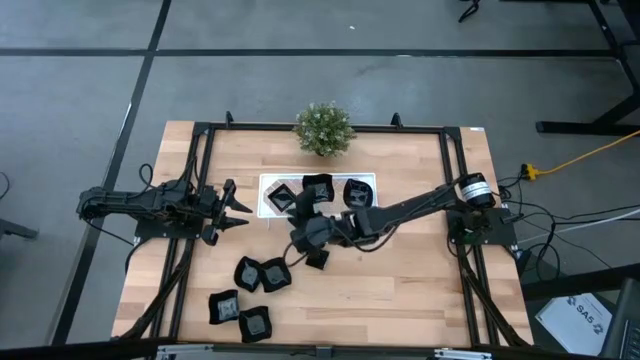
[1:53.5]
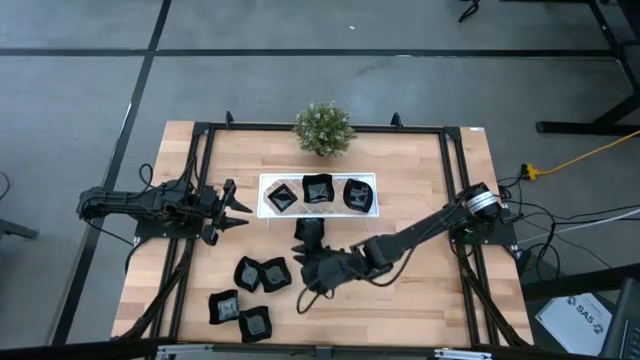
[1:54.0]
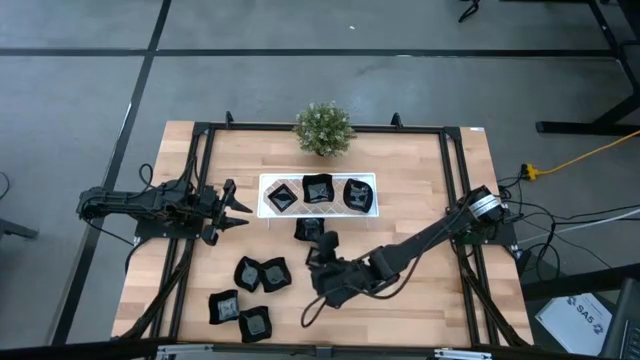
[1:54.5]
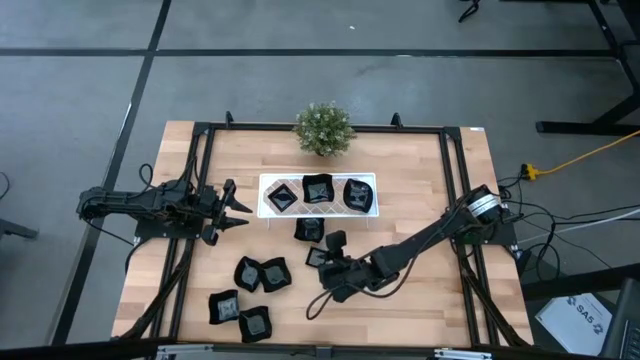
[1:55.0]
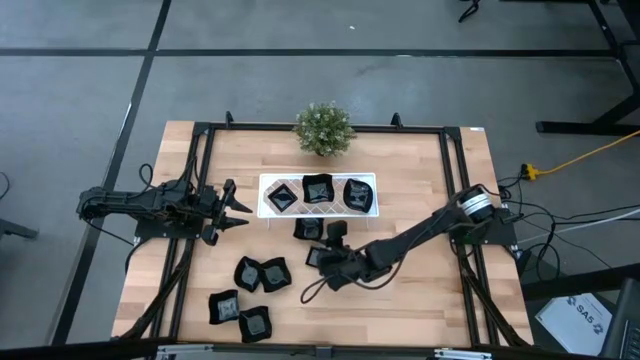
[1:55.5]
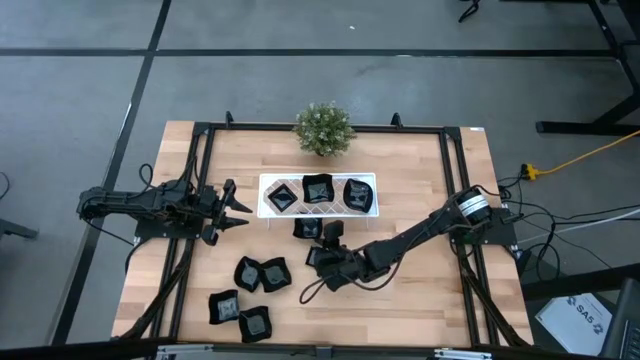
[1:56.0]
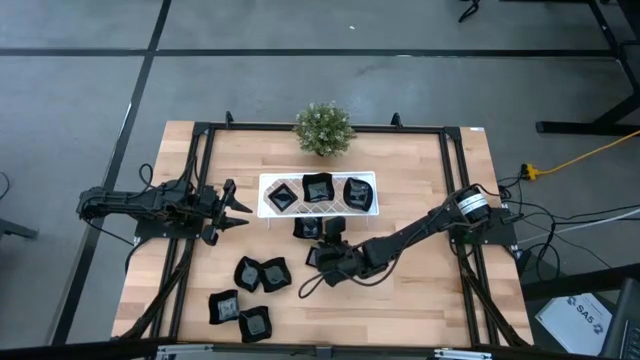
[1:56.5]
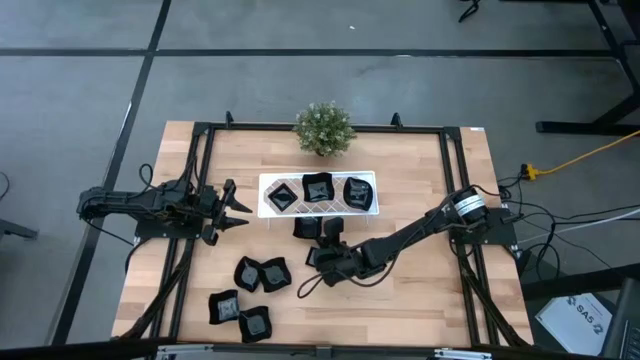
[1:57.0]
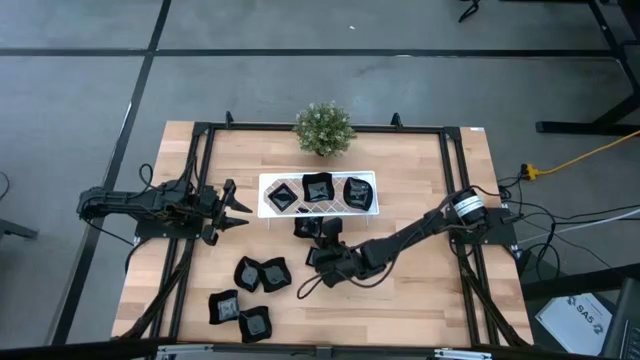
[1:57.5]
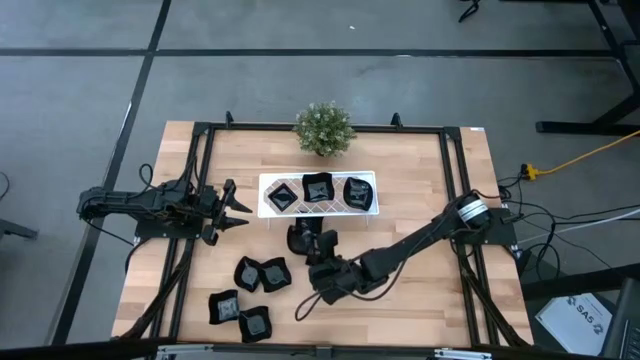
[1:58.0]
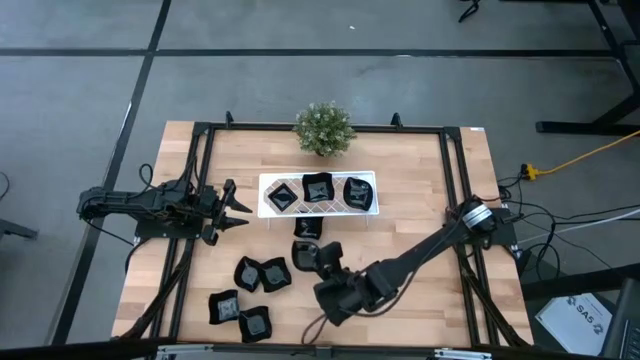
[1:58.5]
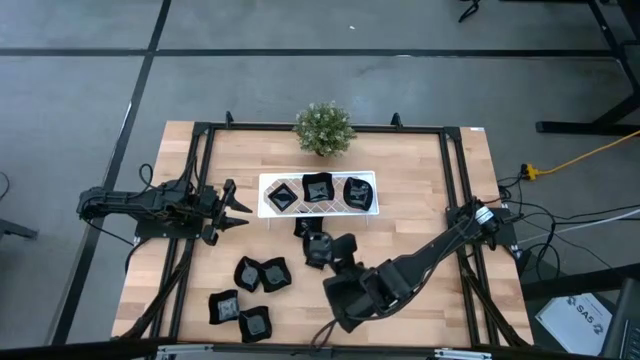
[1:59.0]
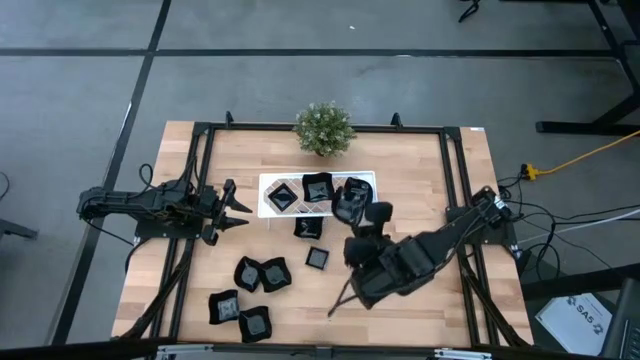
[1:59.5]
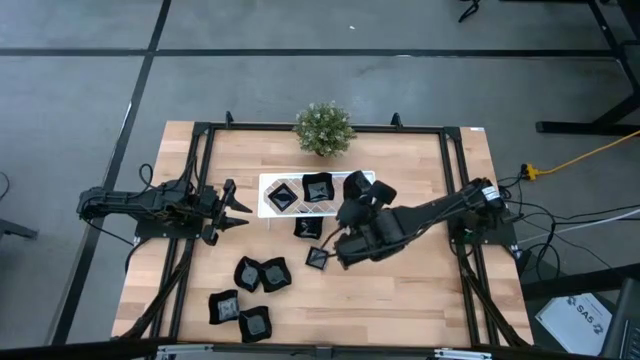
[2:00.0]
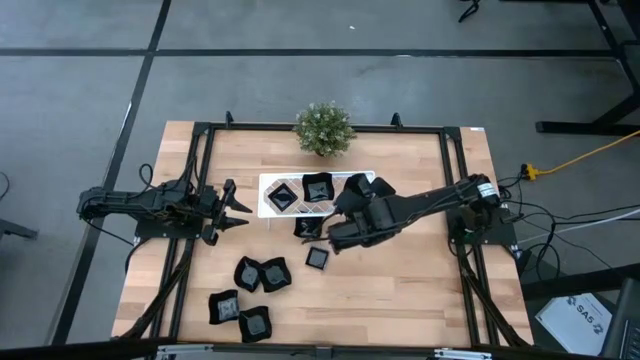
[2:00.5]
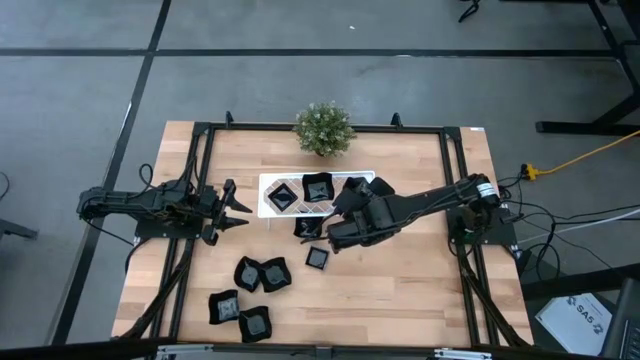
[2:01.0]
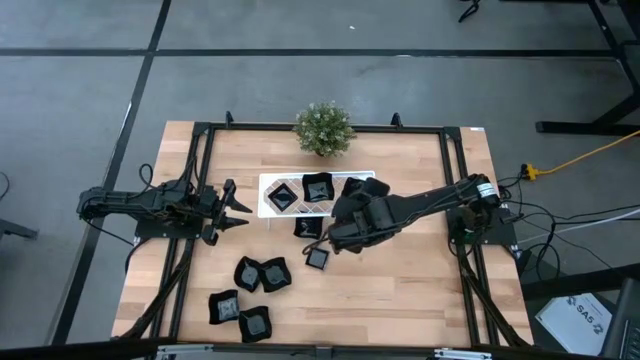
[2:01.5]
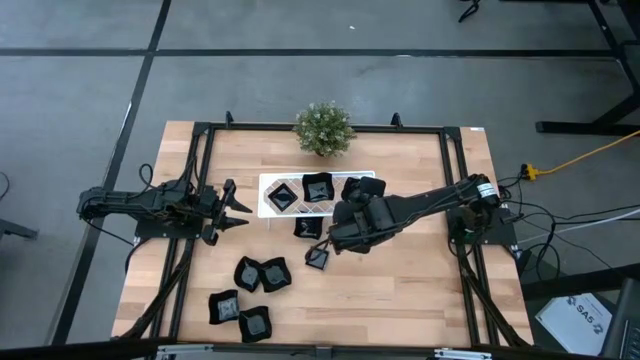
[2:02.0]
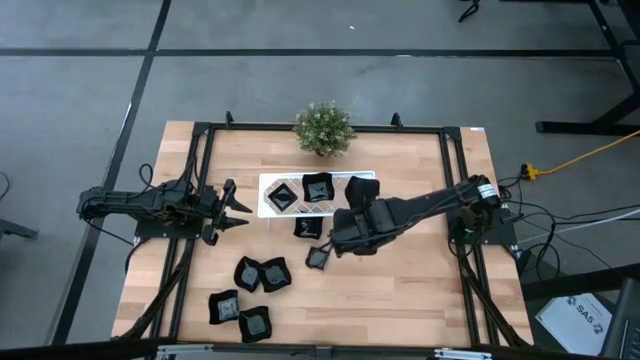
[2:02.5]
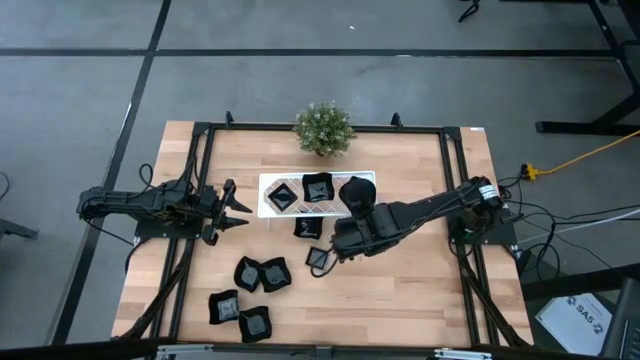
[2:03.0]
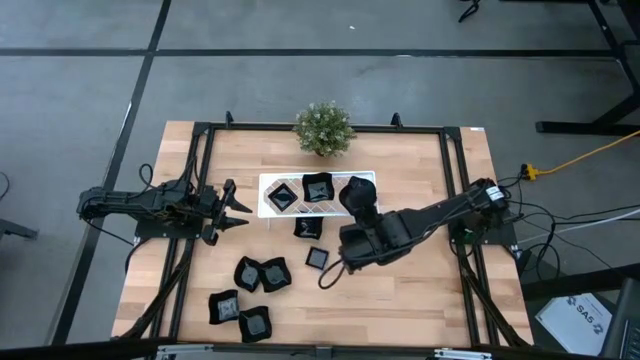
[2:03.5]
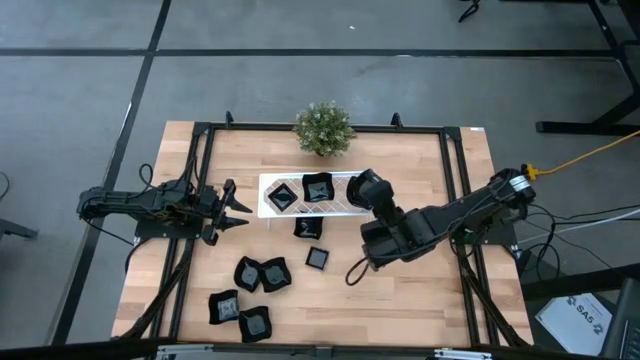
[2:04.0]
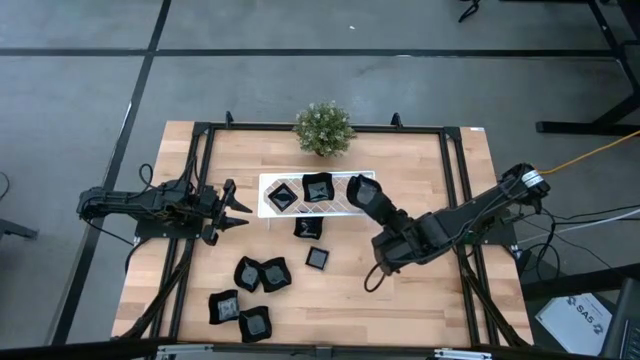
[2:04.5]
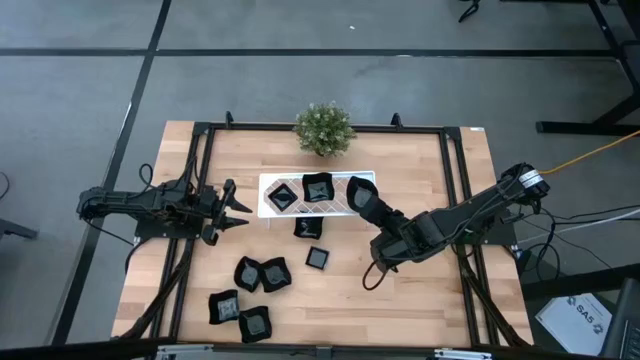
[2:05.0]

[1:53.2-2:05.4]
Task: Pick & Place Mini shaped plates
Stack the black leaf-shaped plate on top of the black leaf-shaped plate on the shelf

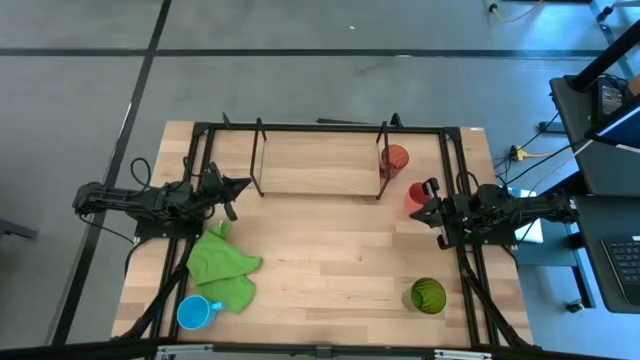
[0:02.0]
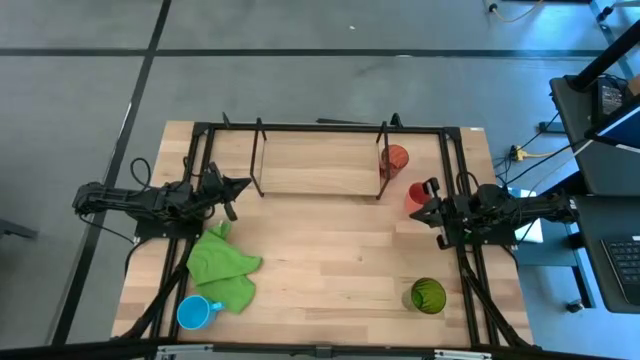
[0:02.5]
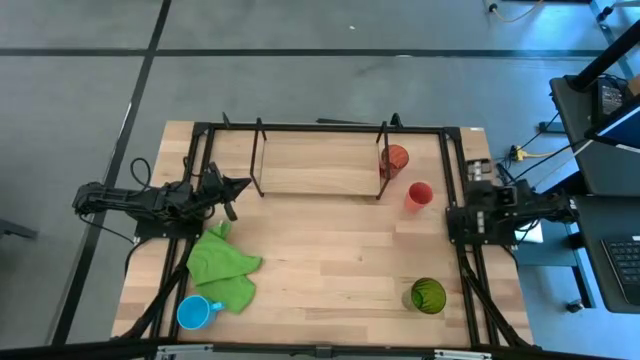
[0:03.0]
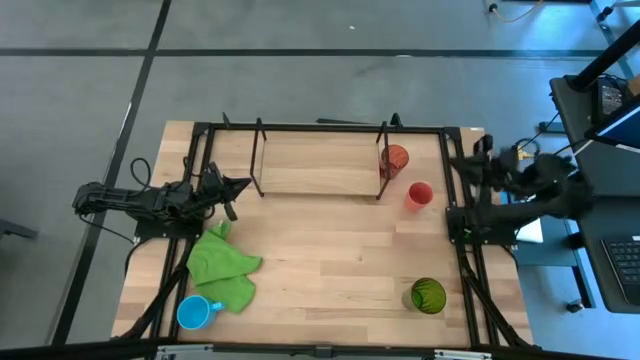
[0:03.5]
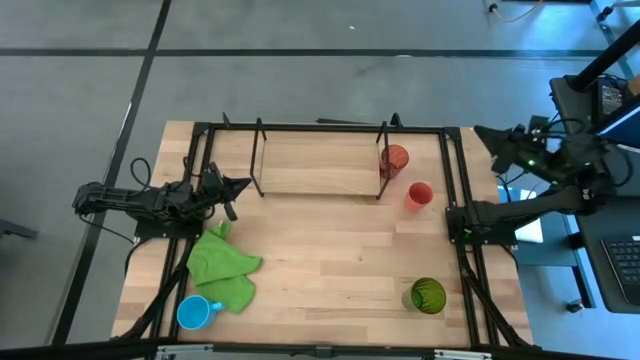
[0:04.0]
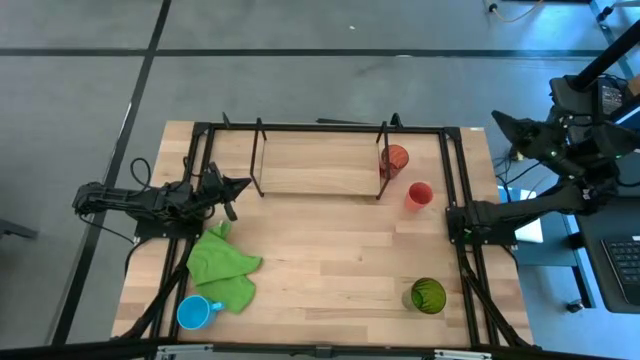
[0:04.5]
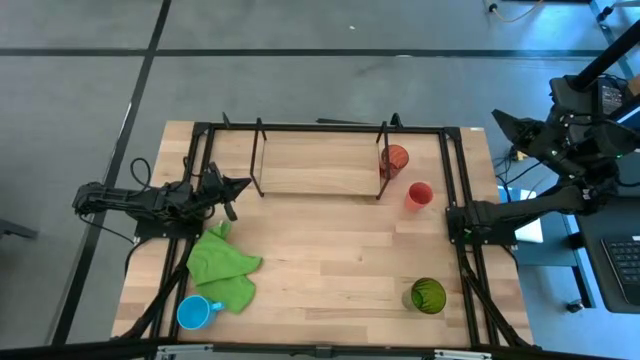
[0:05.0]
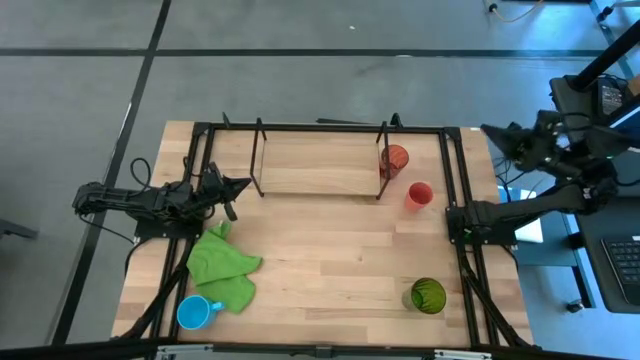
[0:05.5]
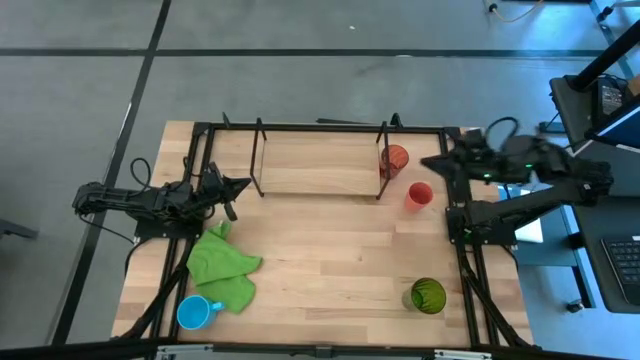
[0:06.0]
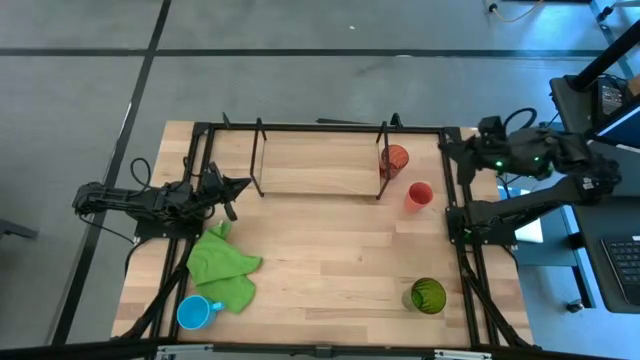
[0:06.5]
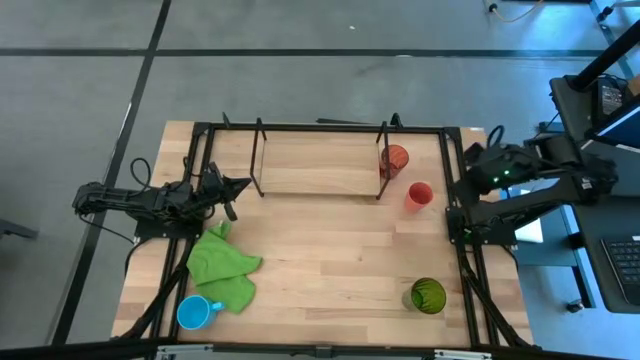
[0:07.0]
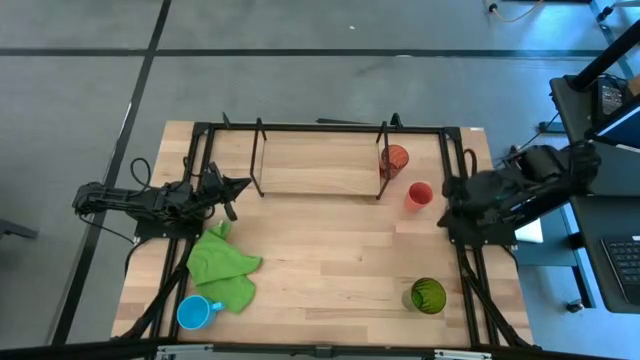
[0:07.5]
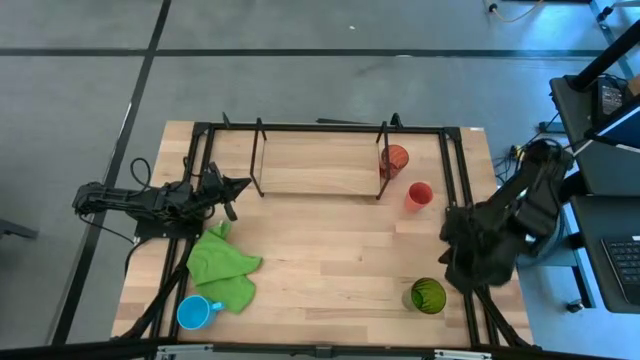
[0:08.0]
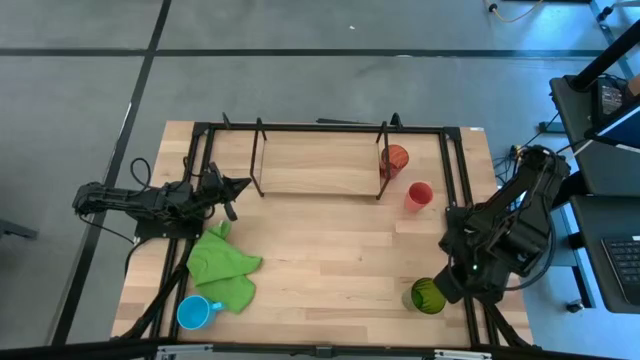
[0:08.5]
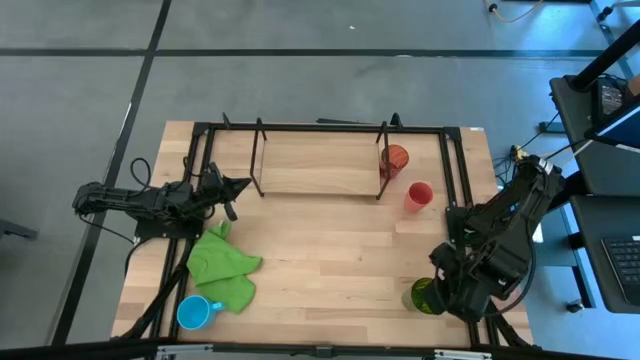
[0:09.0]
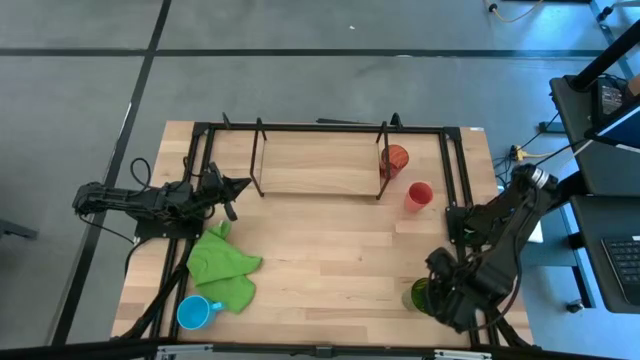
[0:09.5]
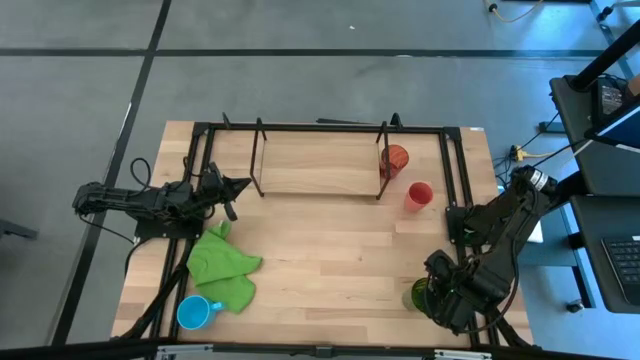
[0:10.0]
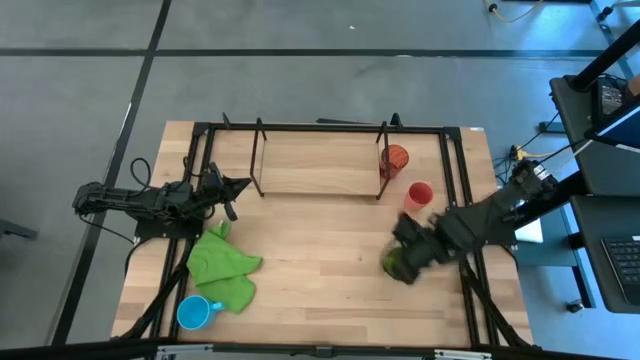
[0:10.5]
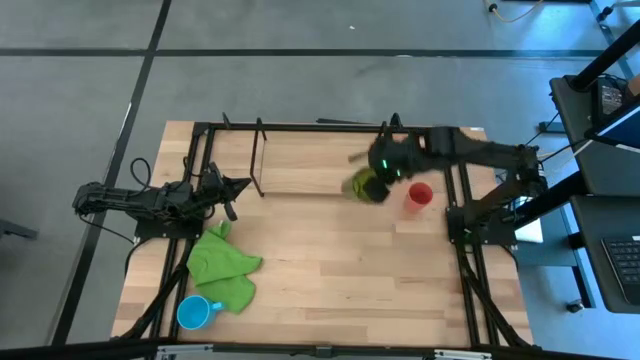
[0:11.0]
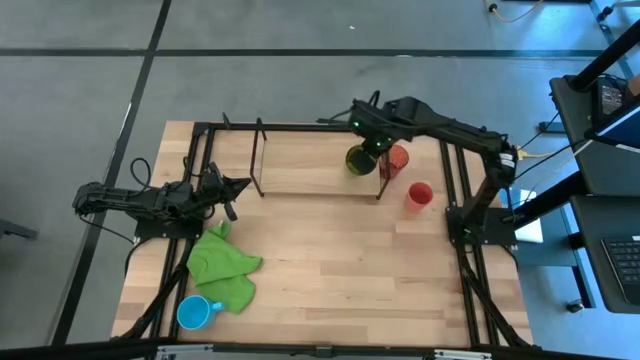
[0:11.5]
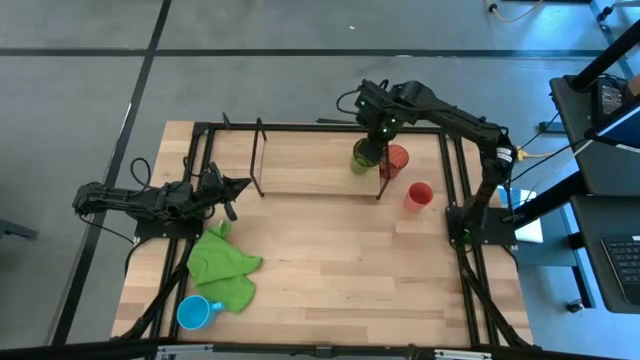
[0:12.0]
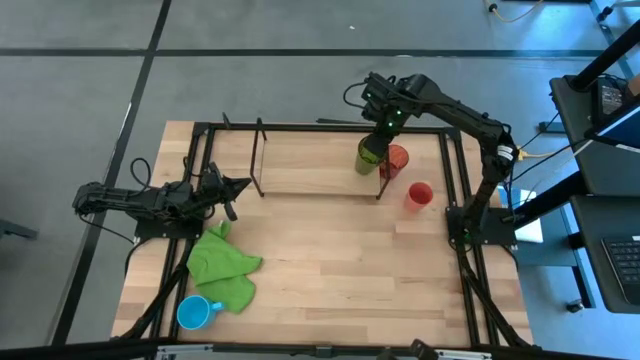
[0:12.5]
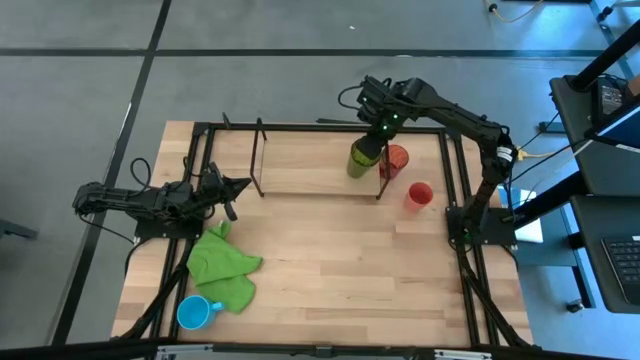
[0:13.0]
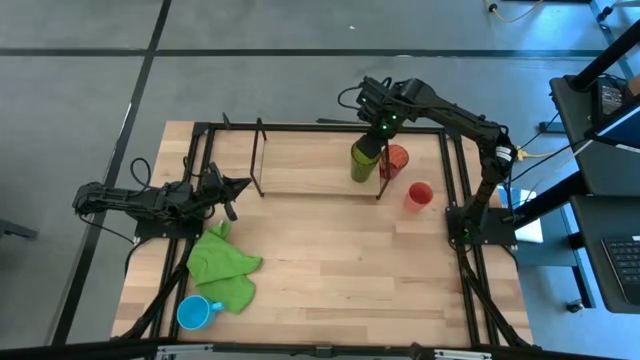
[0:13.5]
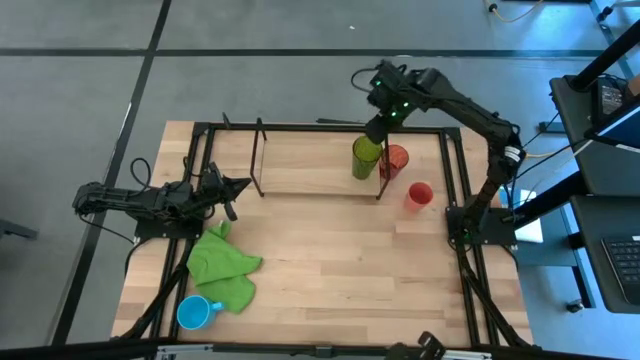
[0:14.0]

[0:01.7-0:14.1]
Task: Stack small to large cups/mugs on shelf
Put the green cup on the shelf
